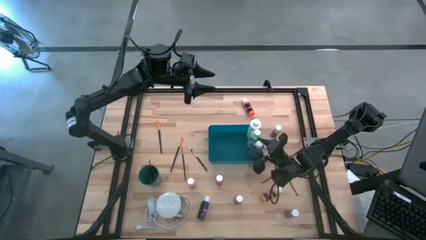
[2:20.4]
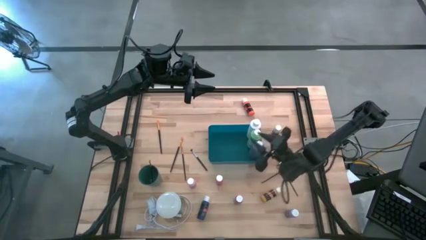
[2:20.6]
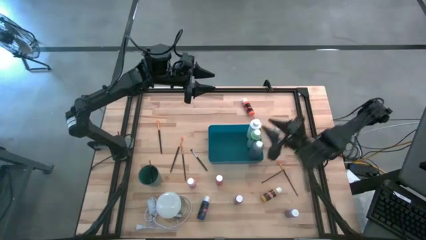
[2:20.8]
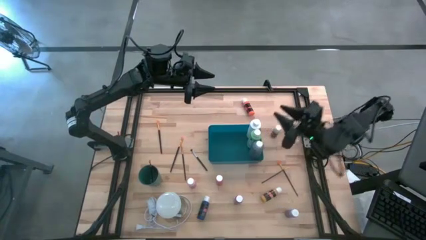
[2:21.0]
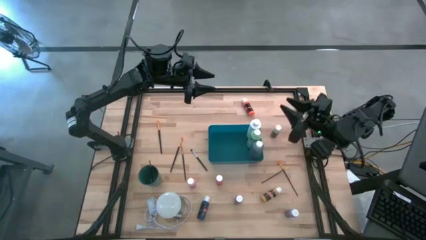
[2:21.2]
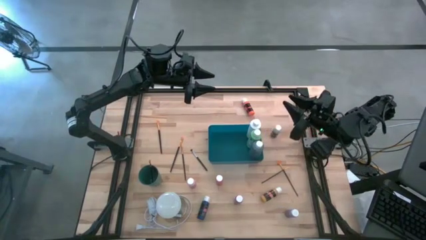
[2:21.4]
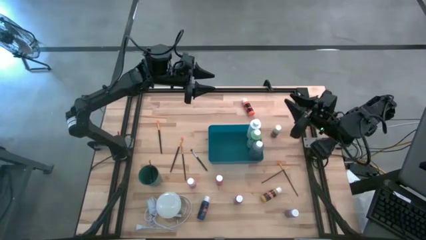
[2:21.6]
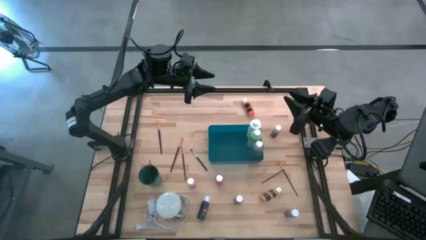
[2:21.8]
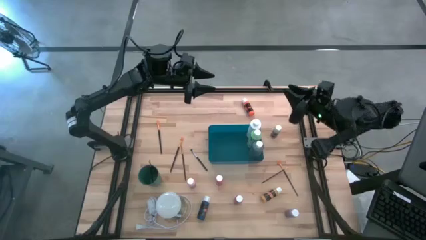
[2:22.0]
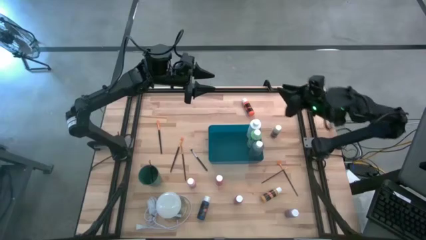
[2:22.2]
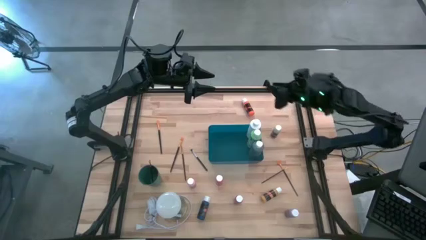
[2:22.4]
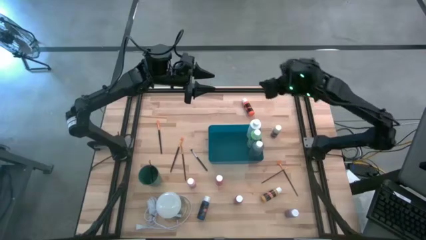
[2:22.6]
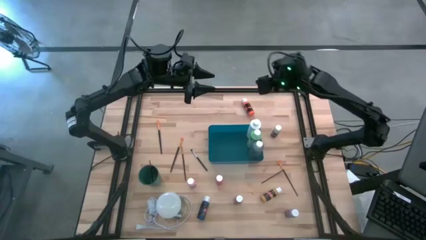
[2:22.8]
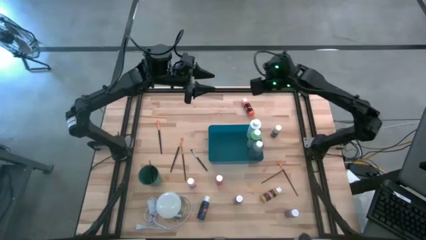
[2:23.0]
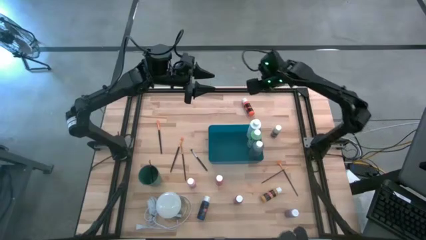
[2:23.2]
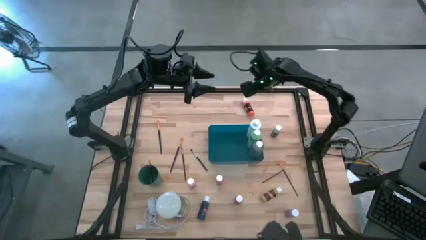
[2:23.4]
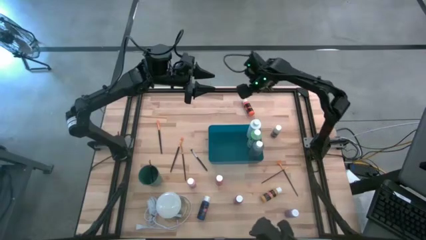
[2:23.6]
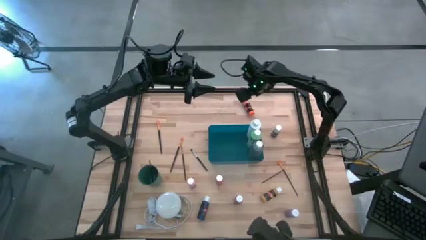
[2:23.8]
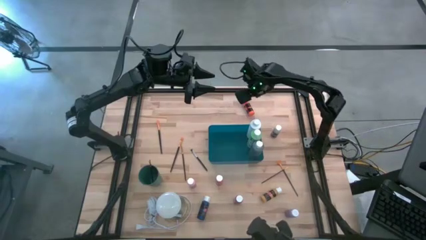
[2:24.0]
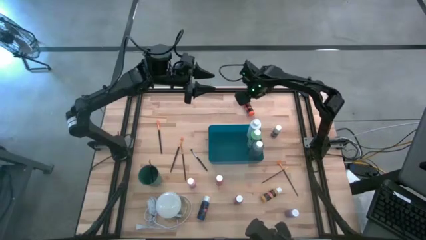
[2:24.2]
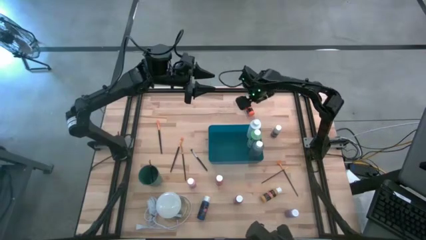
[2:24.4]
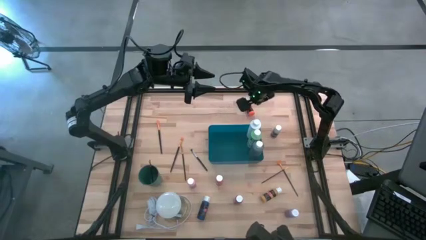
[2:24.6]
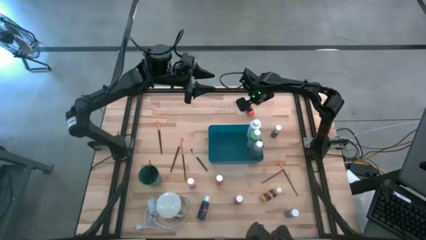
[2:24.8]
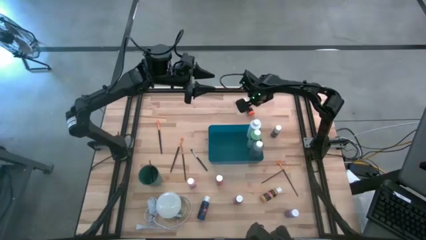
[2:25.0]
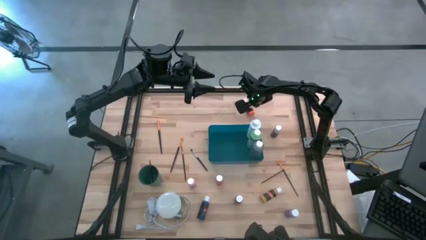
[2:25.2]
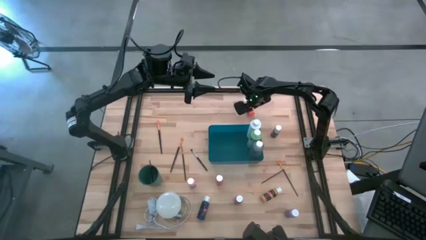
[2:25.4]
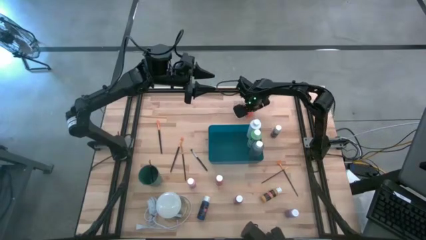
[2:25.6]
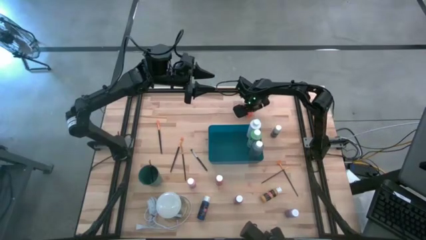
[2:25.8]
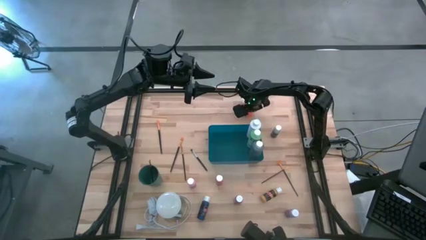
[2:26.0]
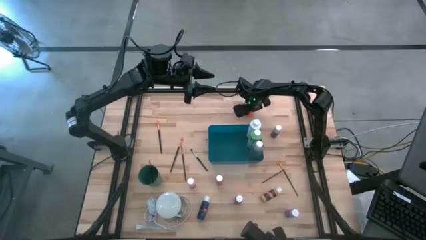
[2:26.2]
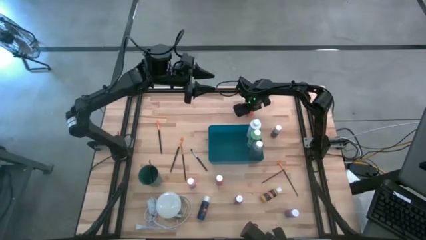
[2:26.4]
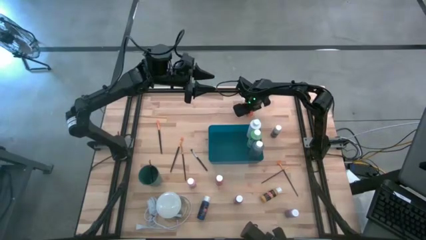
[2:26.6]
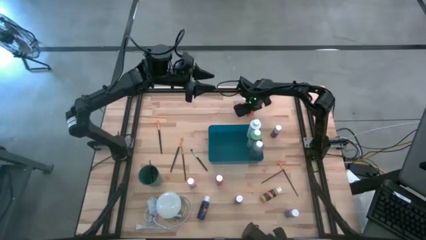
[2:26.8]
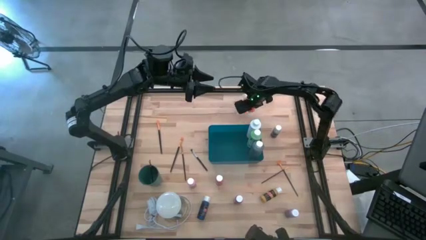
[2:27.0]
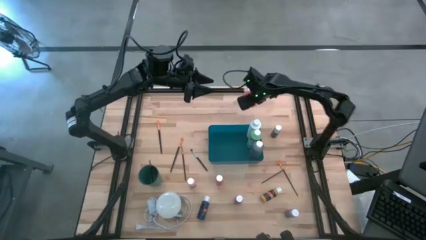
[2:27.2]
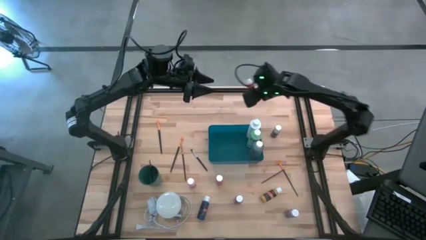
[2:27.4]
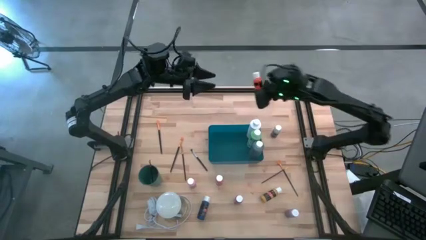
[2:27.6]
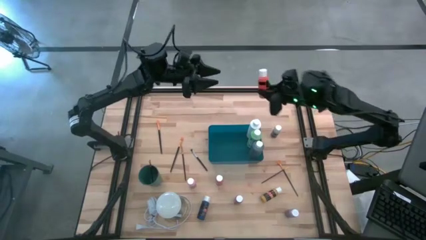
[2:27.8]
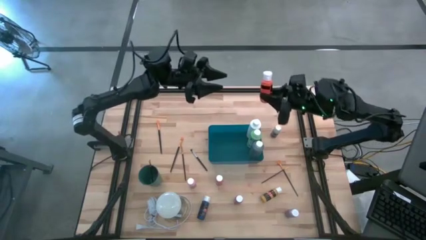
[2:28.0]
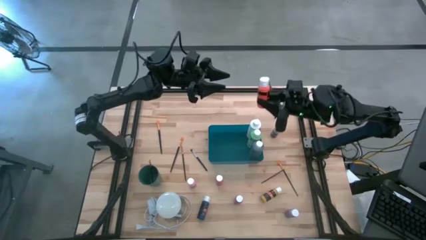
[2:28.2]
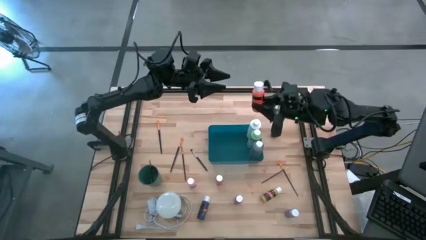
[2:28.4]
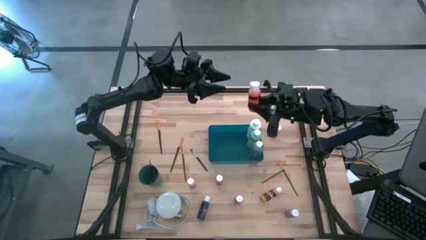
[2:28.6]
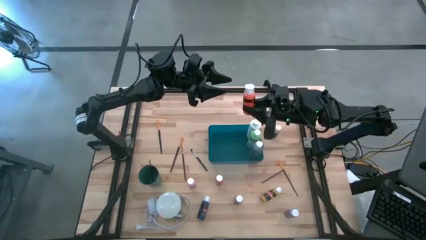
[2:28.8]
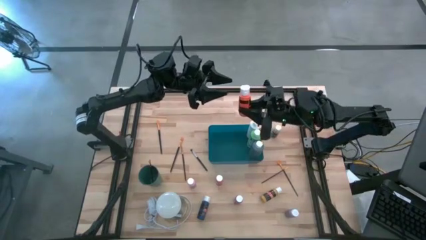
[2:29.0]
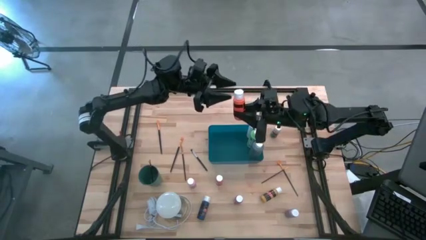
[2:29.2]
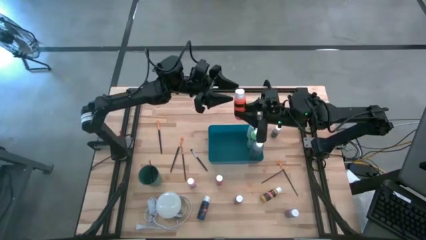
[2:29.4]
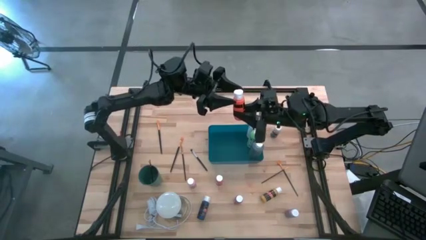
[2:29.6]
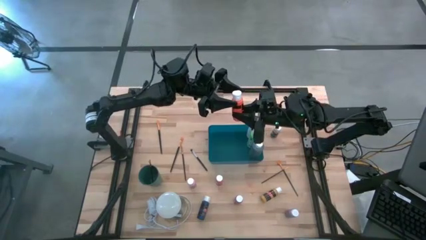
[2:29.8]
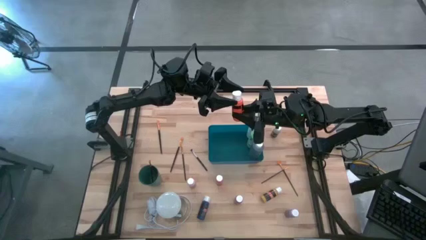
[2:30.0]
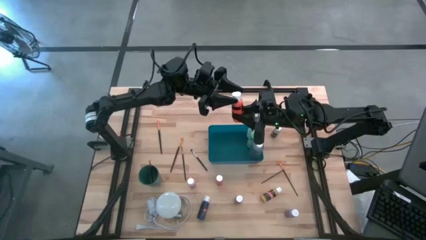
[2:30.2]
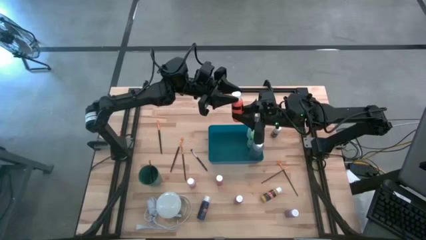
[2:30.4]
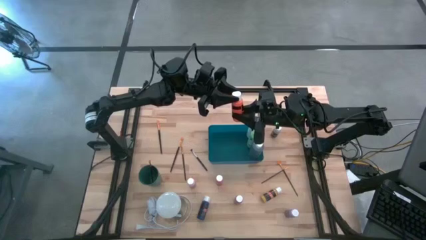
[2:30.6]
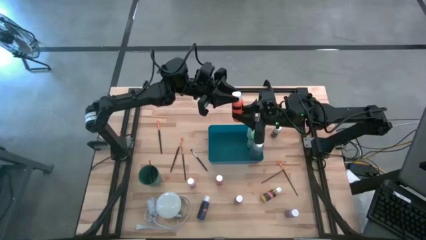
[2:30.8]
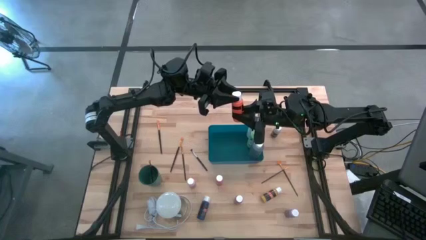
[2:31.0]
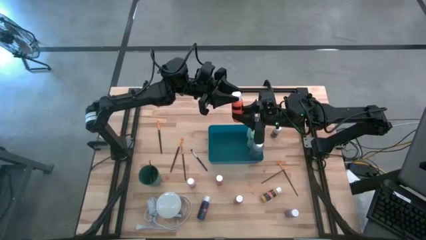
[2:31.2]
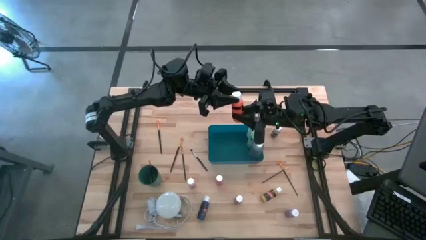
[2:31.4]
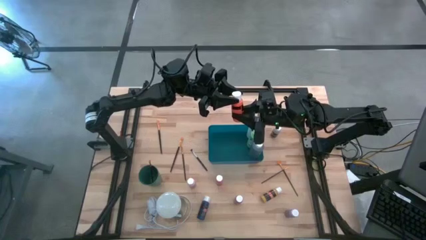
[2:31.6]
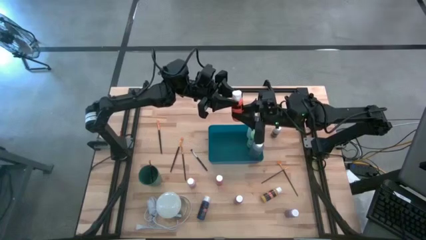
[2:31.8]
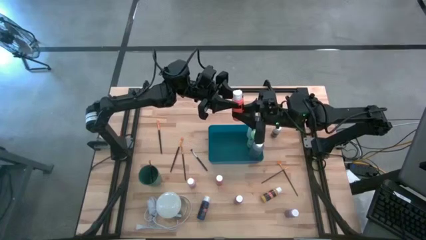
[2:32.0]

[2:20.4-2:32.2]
Task: Pick & Place Paint Supplies
Put the orange paint bottle into the blue bin

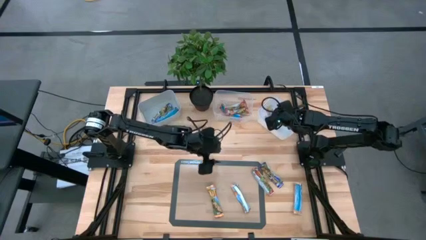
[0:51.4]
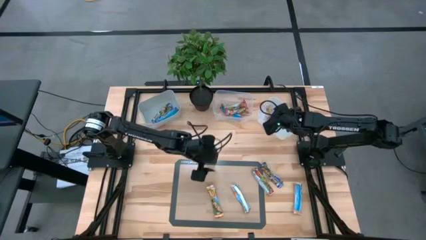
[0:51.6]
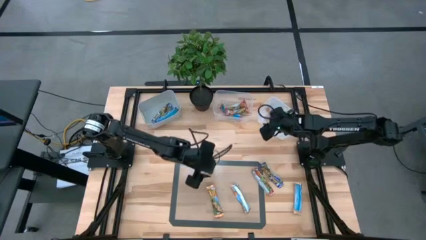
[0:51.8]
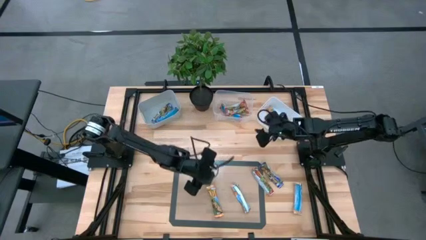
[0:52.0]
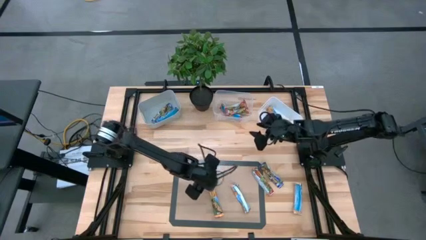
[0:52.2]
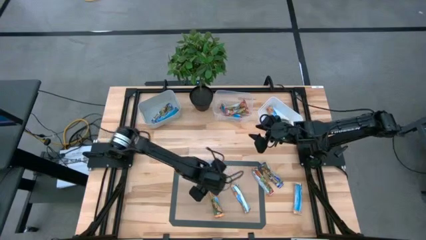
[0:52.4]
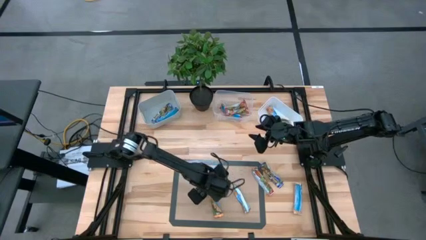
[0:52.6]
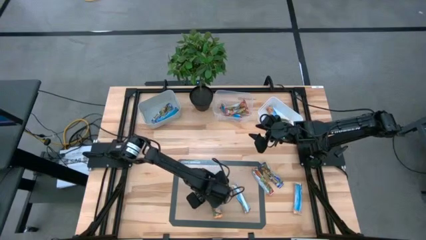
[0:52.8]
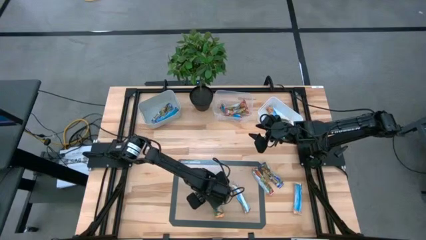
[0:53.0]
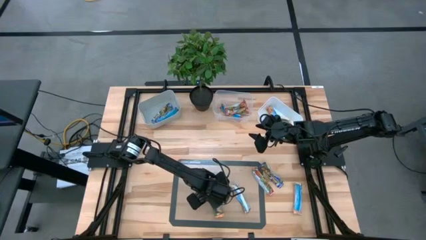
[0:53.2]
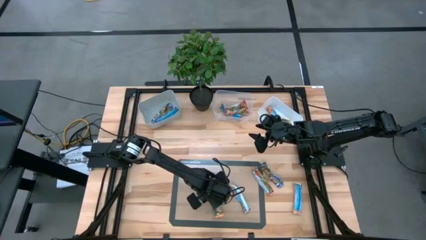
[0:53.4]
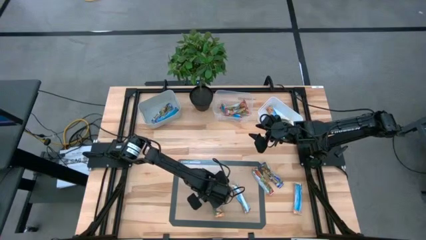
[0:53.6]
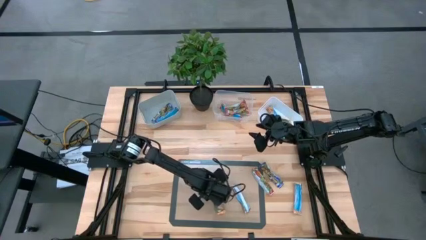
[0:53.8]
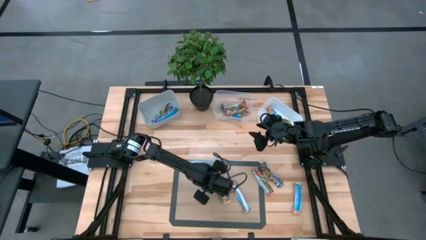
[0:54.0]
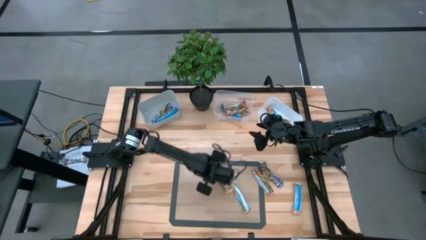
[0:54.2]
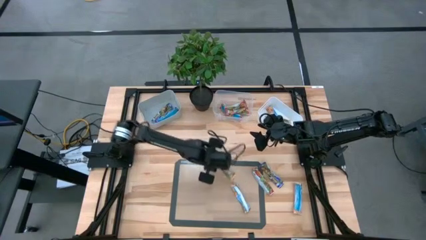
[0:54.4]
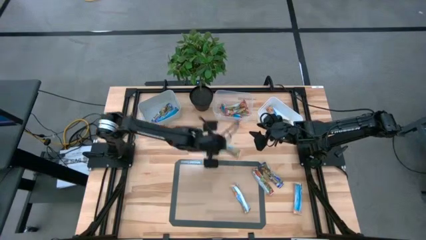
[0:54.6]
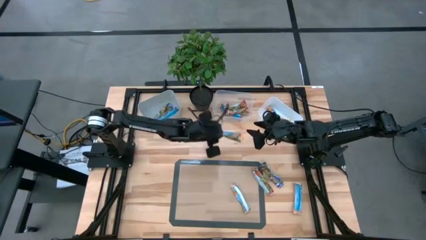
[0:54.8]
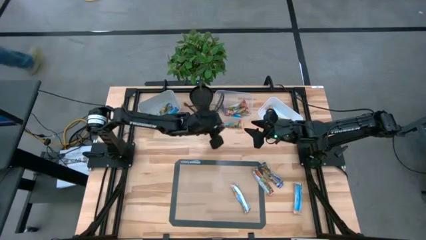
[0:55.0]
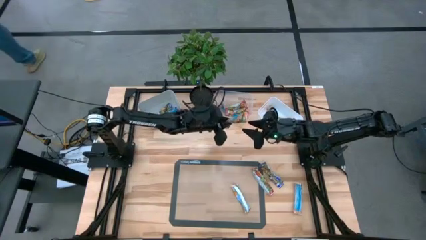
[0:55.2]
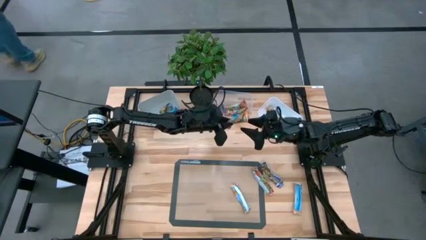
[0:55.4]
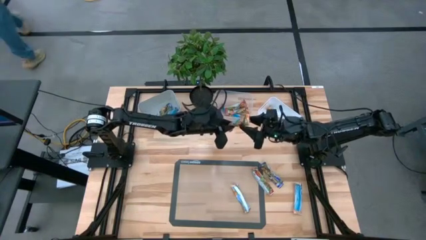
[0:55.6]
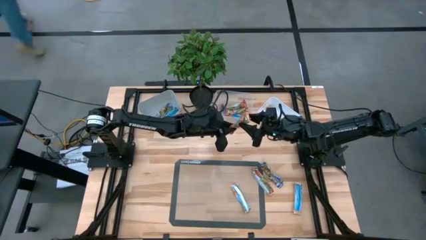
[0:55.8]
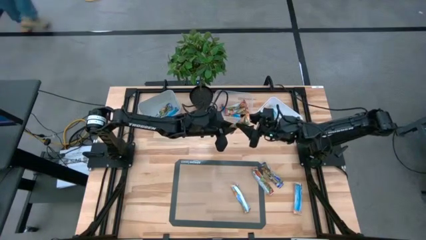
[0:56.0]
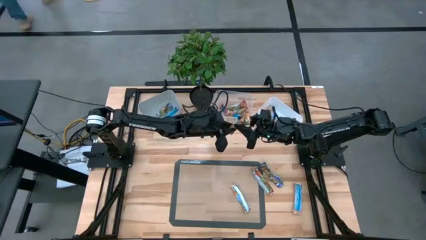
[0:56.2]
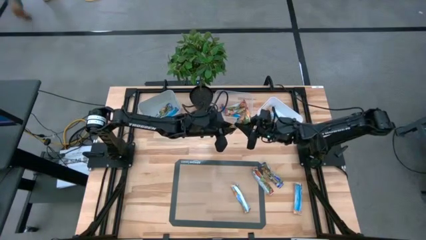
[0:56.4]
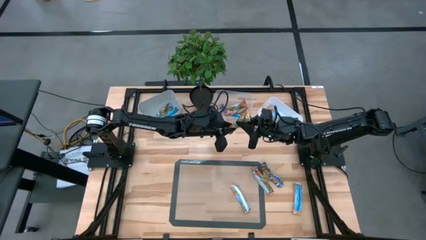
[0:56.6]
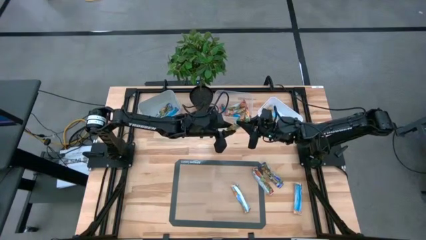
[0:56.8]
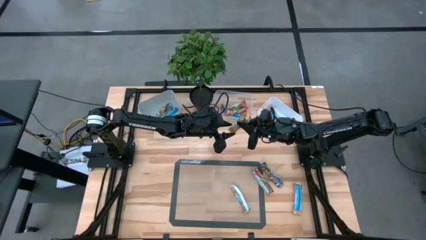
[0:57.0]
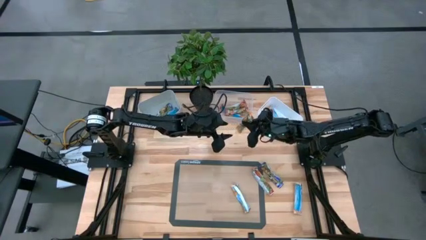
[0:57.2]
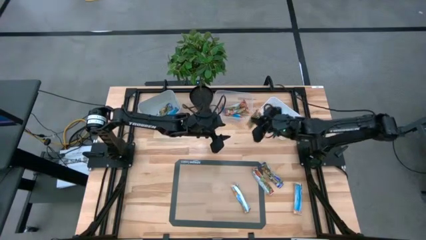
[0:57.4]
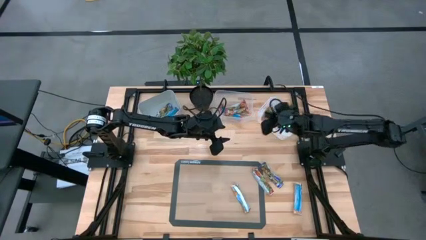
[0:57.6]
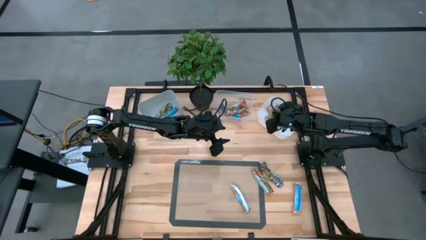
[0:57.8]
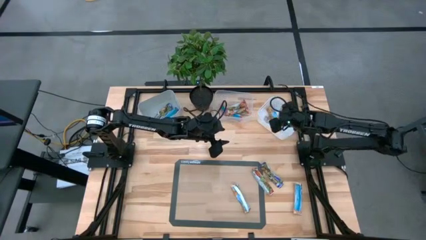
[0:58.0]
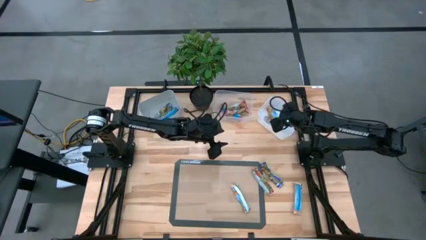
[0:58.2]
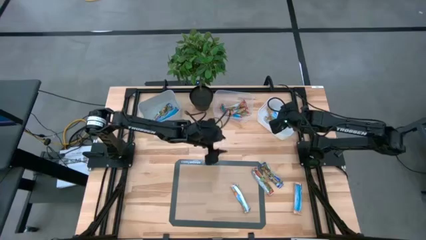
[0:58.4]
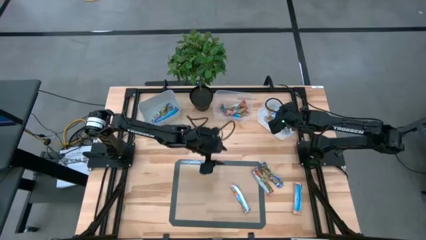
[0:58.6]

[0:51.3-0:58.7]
Task: Pick and place Granola Bars by type
Put the yellow granola bar into the white bin
